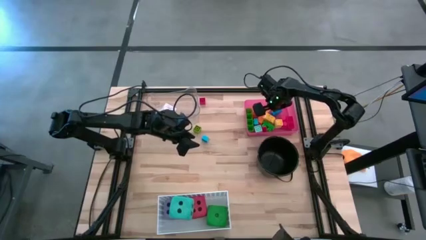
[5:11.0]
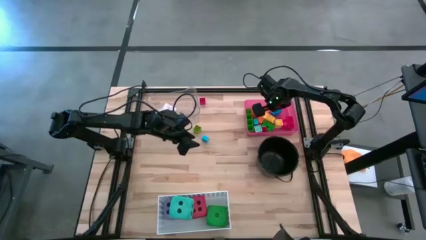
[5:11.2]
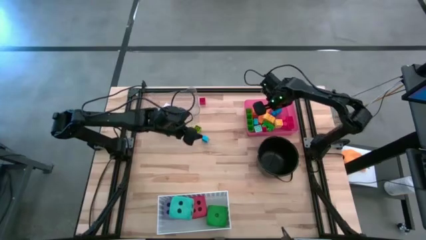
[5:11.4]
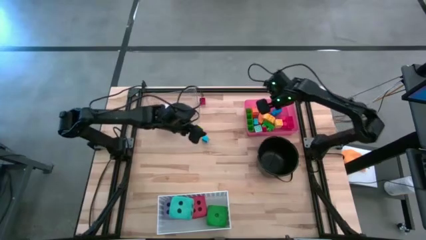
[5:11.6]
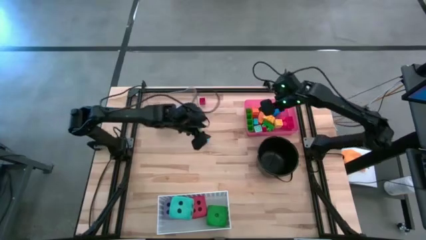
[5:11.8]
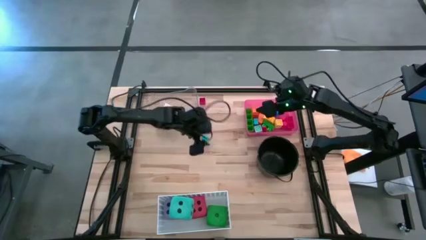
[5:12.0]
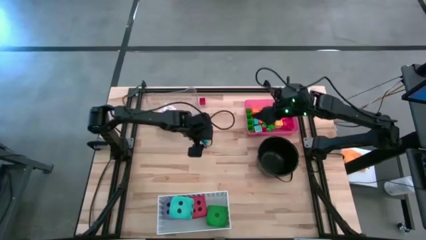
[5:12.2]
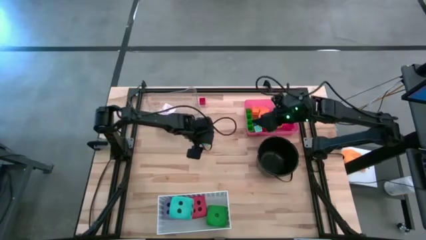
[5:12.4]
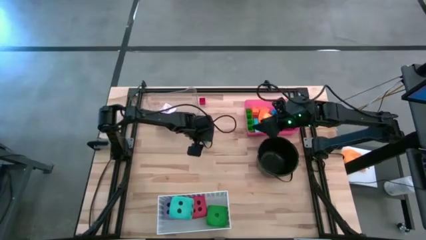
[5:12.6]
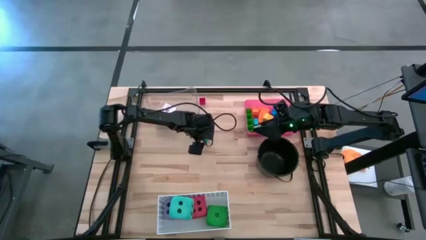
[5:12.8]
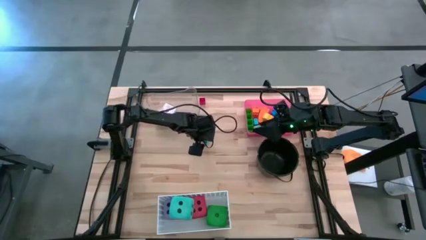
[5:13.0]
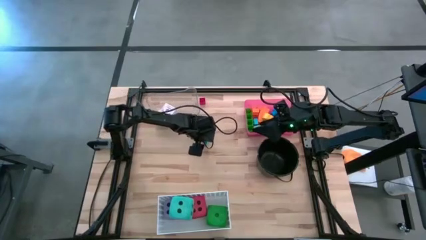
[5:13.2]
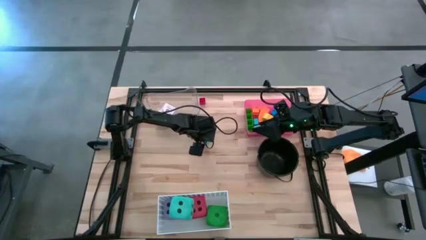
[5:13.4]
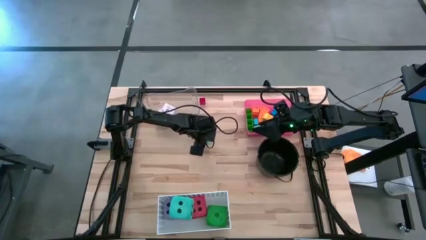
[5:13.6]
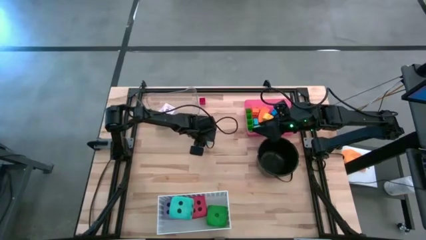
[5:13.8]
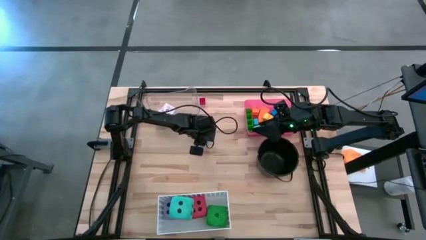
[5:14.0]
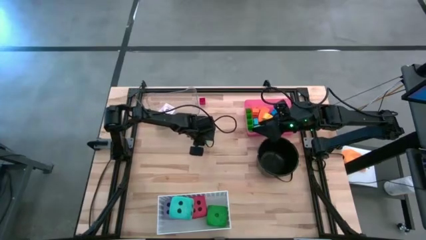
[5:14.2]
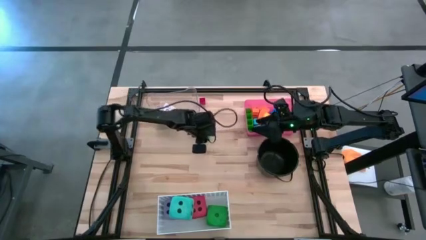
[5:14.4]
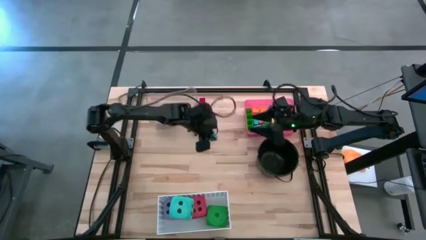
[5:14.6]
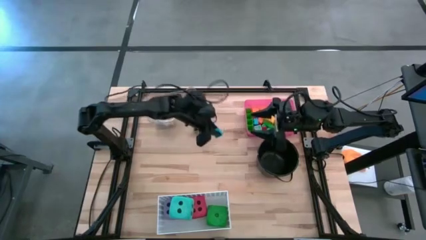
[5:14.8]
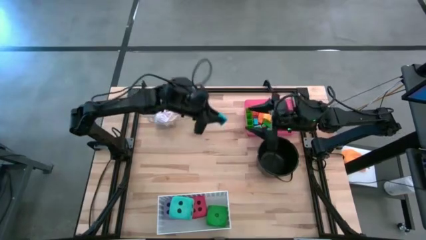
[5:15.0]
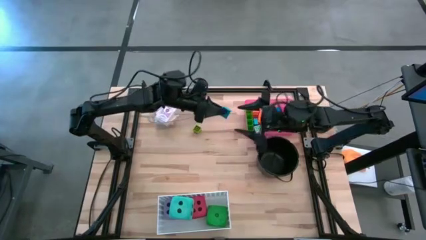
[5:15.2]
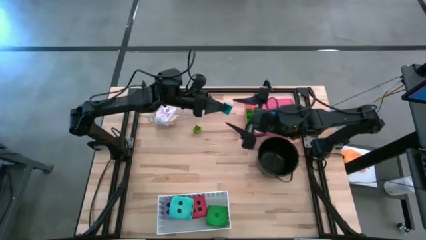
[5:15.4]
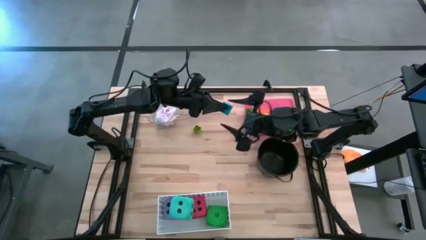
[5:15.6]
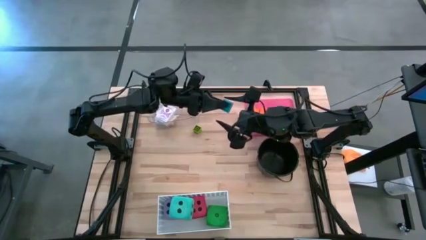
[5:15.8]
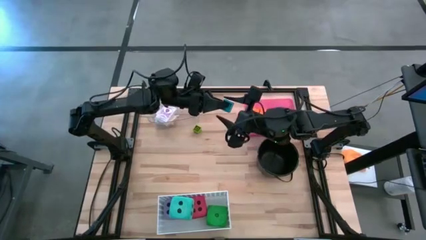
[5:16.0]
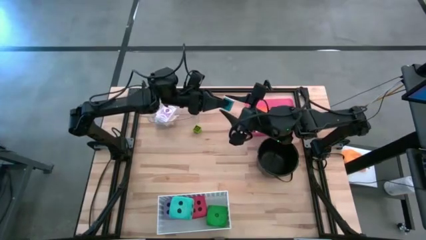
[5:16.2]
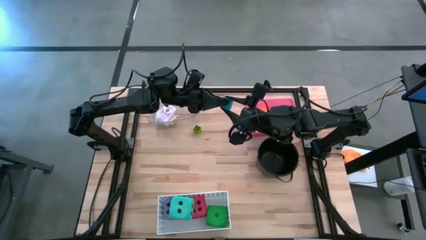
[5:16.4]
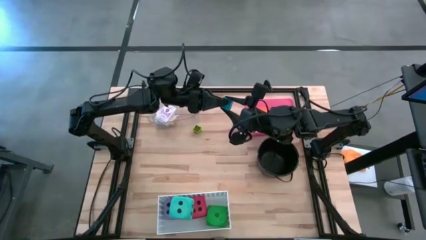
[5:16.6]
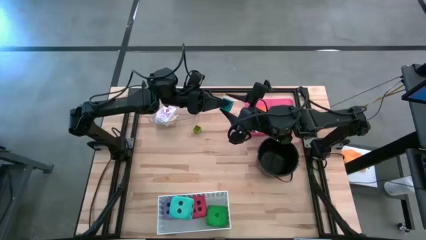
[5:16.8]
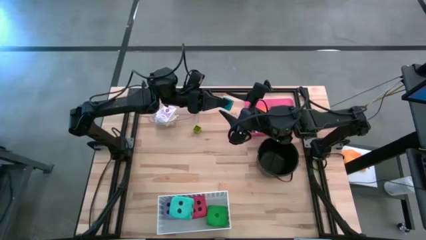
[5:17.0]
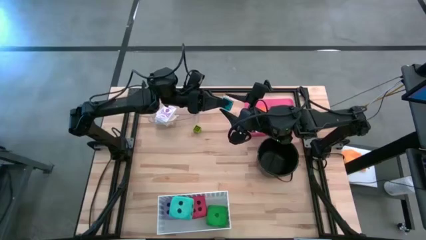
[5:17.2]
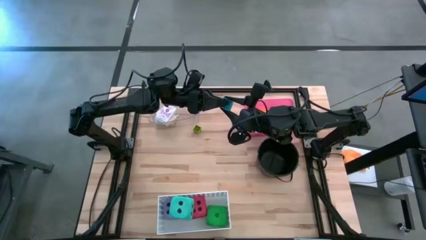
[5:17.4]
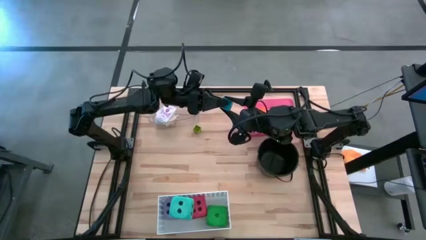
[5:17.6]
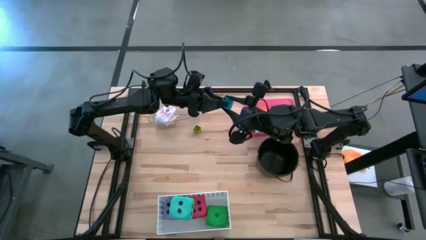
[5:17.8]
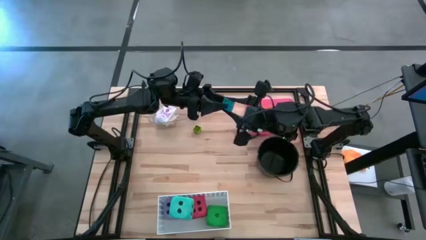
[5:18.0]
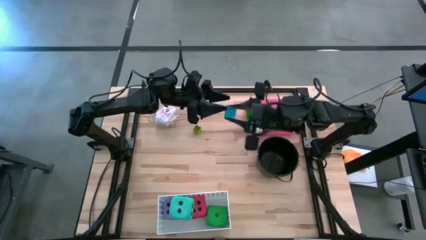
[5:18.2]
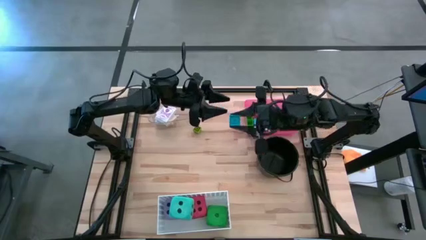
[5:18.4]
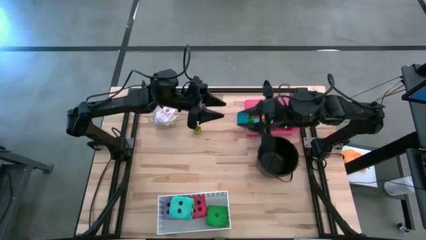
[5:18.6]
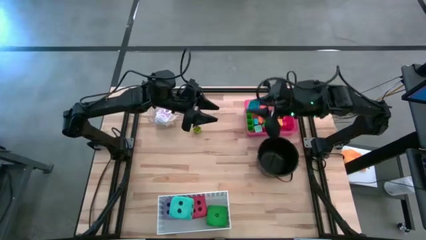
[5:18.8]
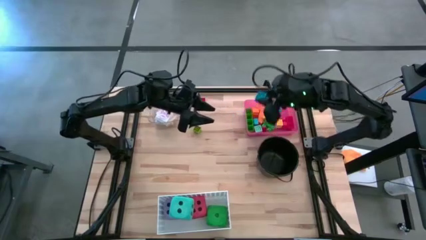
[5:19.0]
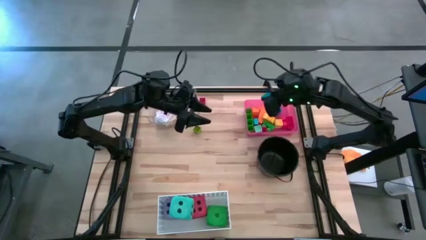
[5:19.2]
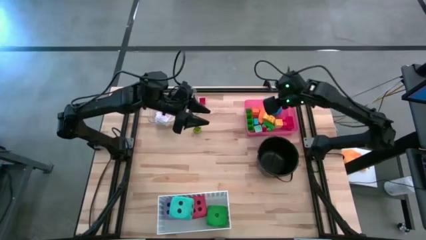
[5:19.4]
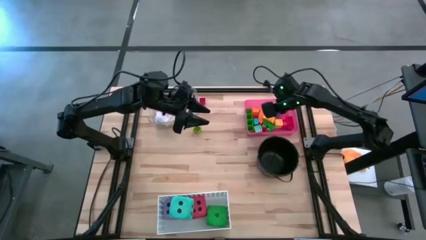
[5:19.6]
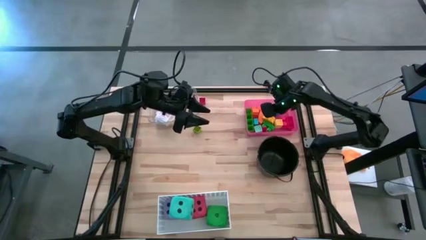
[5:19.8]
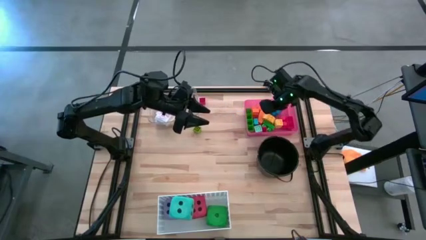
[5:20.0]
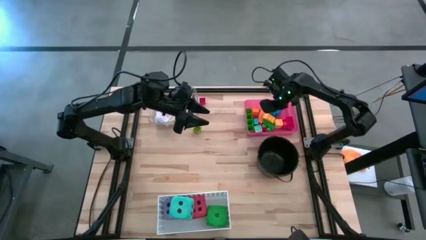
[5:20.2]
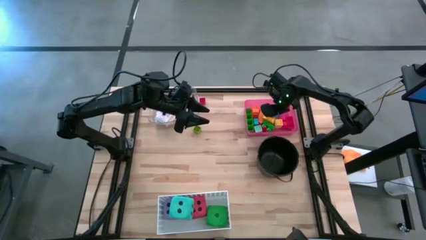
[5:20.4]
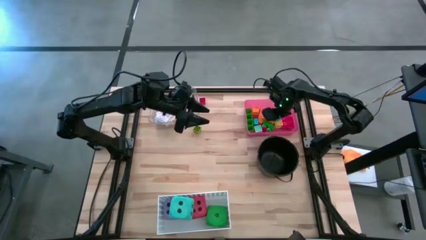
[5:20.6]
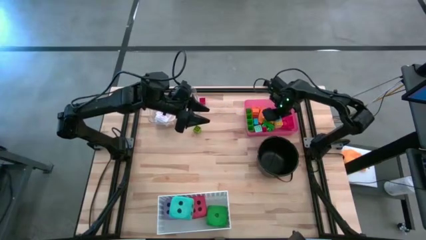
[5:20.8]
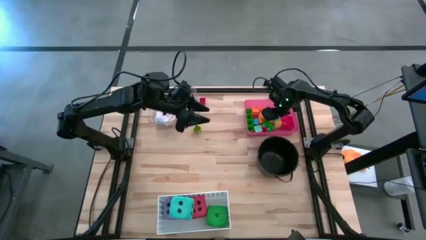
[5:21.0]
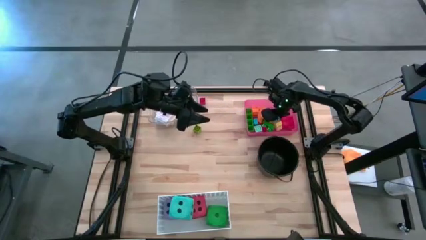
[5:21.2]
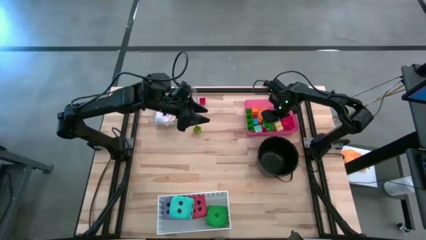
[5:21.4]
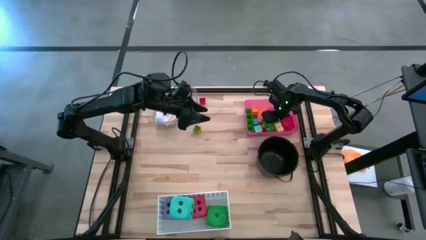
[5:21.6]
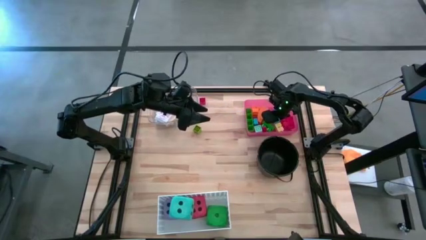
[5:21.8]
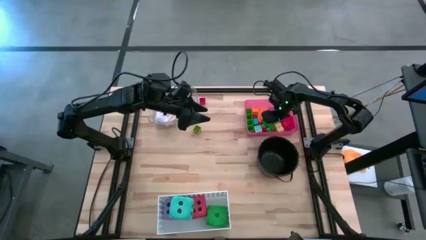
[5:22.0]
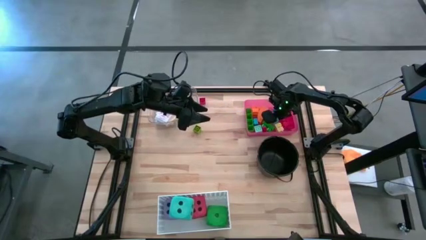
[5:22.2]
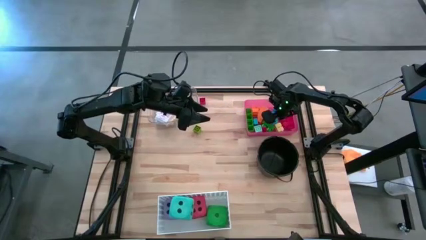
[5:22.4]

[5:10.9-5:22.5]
Task: Pick & Place Toys
Put the light blue game piece into the red bin

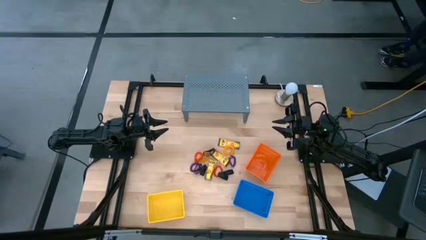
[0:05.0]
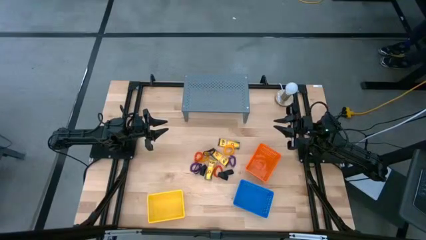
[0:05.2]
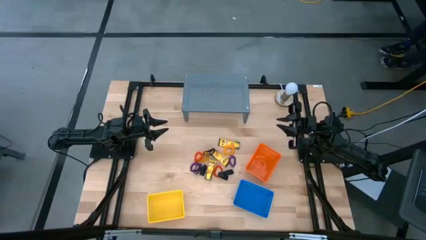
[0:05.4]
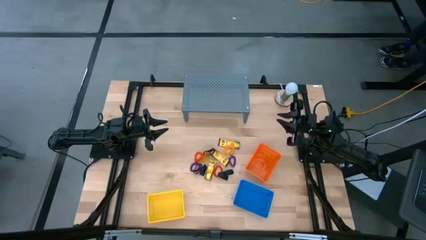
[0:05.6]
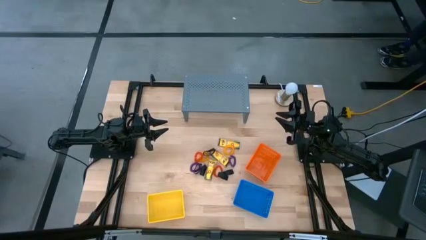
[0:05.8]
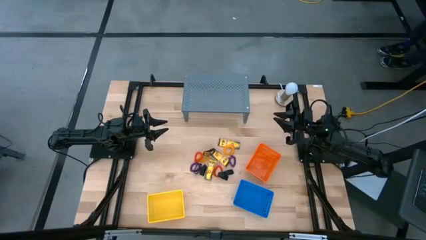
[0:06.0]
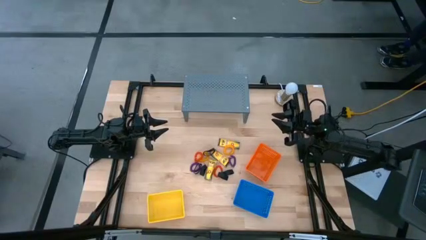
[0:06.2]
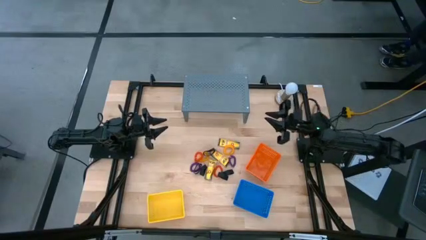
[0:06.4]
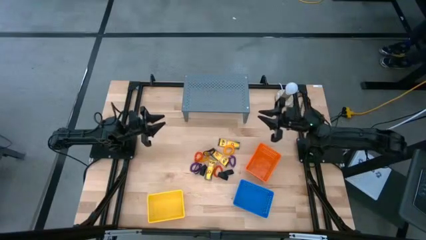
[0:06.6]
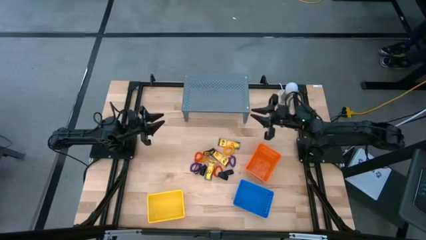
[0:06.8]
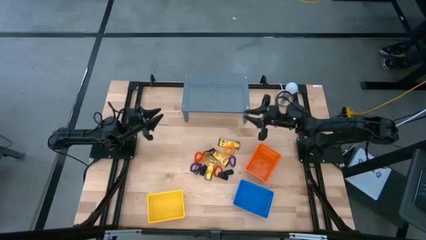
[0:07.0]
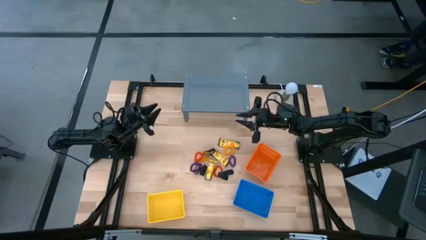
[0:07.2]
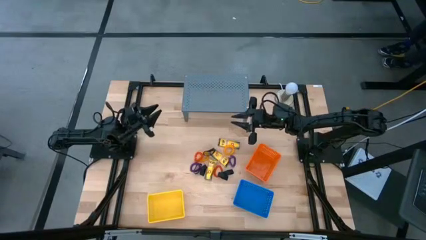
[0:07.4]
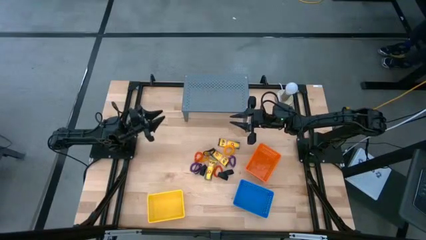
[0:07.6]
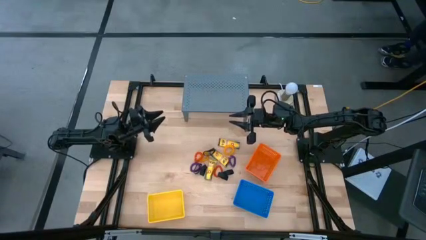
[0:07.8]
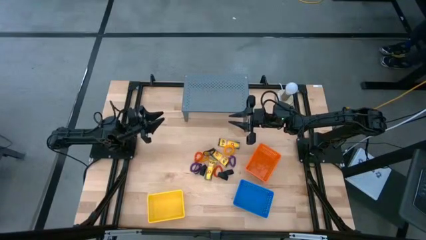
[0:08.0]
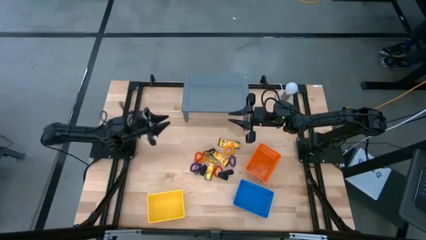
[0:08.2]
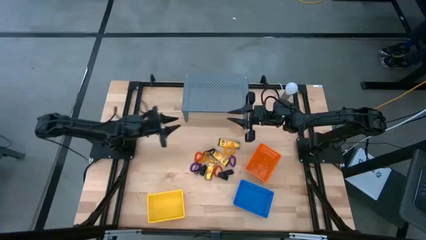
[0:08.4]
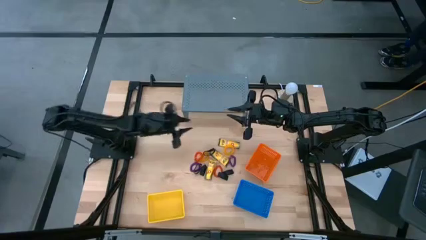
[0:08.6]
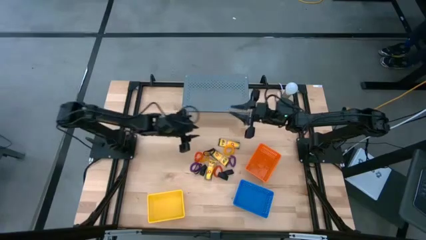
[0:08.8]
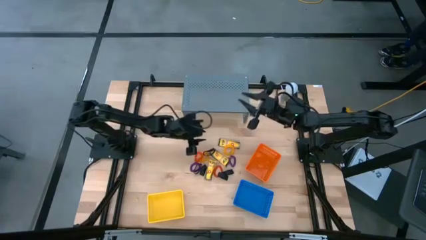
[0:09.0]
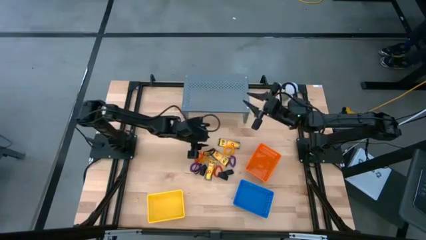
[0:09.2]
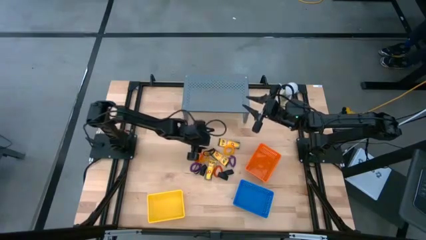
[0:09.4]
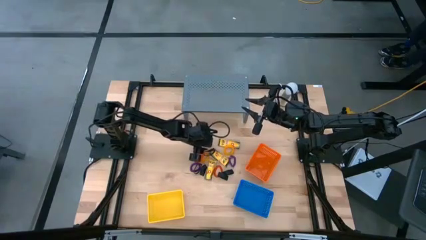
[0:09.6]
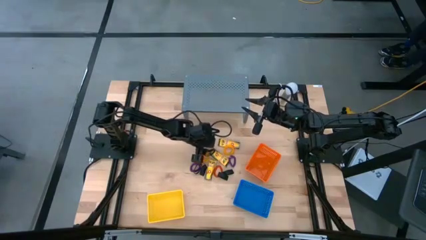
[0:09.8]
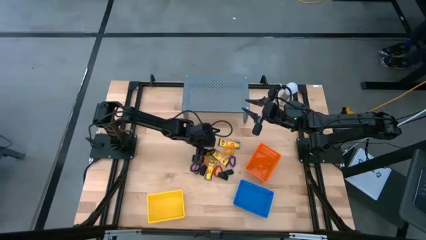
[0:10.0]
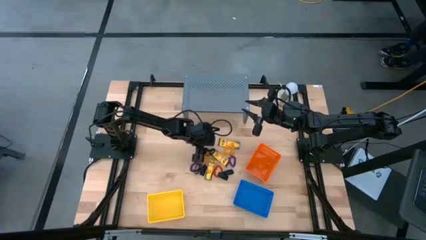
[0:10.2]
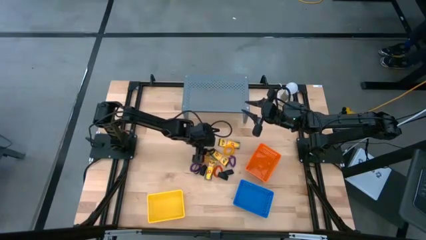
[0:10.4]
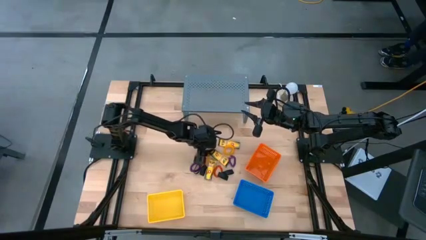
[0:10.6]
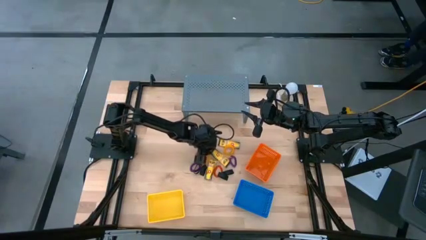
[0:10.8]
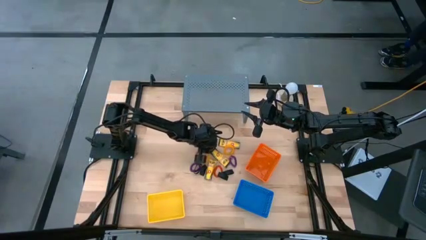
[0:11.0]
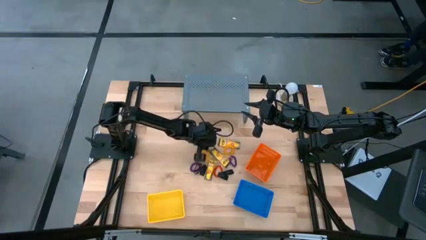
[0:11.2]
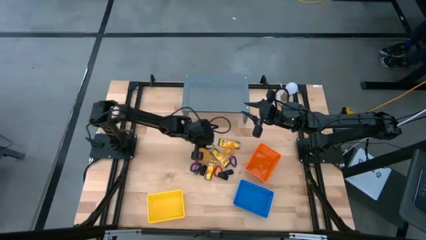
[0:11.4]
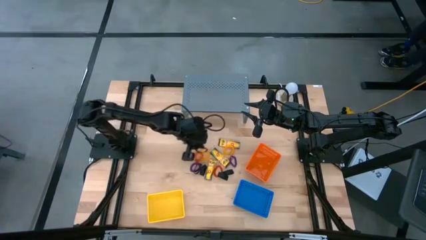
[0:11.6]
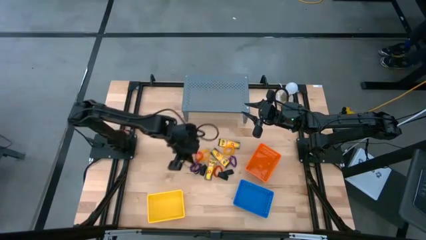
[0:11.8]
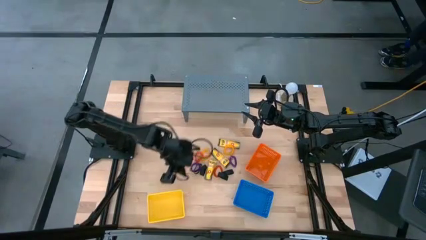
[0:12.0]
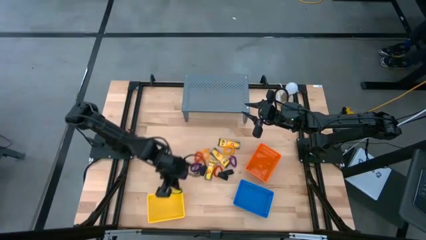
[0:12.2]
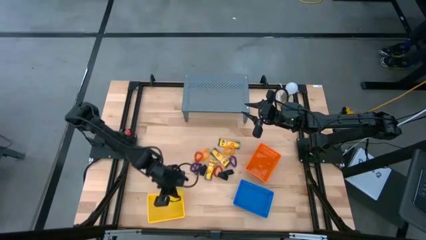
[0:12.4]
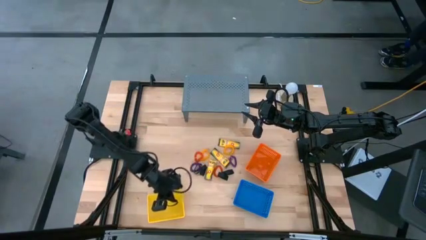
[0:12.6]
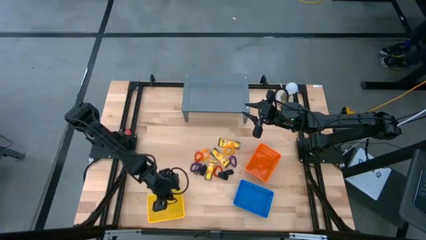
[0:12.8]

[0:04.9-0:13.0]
Task: Pick & Place Office Desk Supplies
Put the black rubber band into the yellow basket
